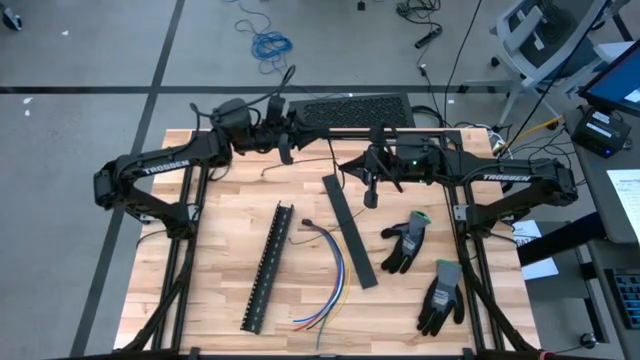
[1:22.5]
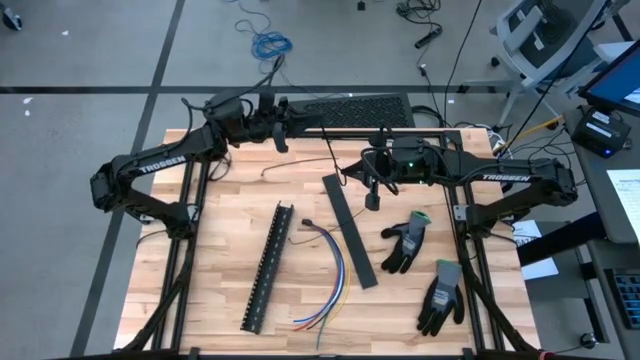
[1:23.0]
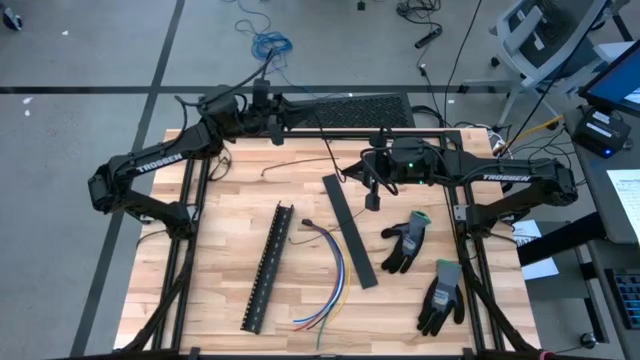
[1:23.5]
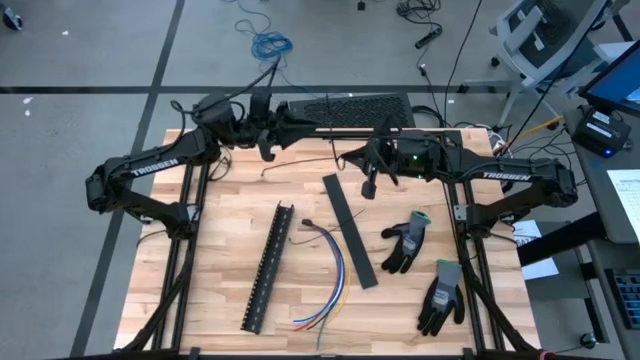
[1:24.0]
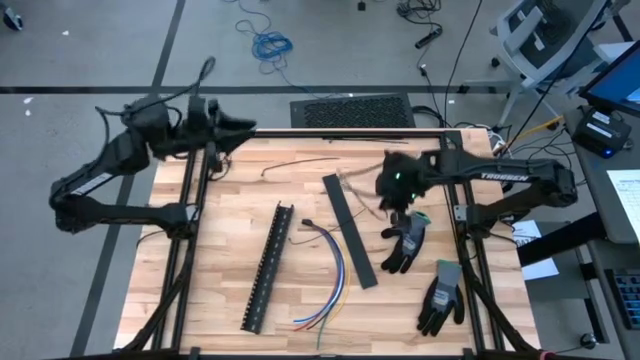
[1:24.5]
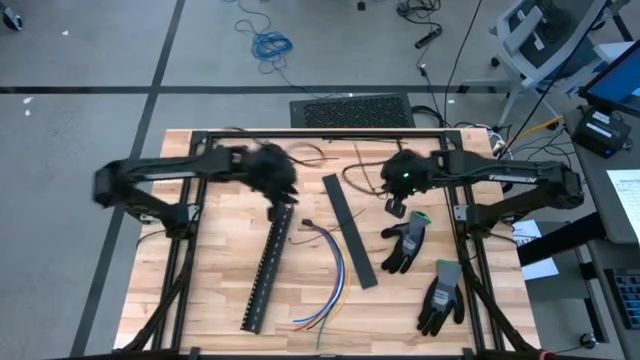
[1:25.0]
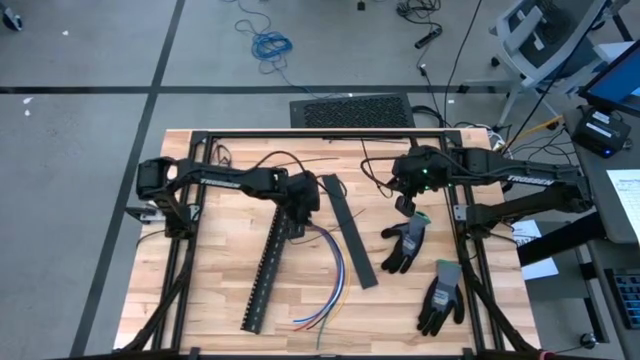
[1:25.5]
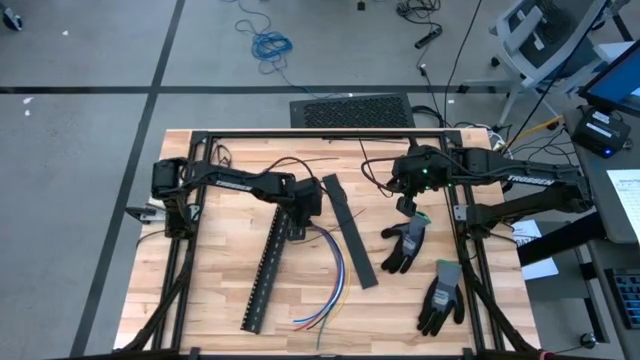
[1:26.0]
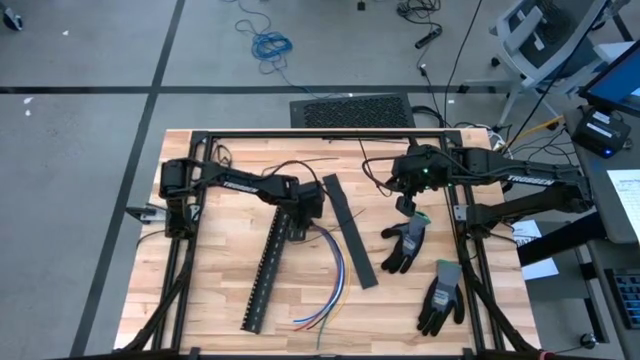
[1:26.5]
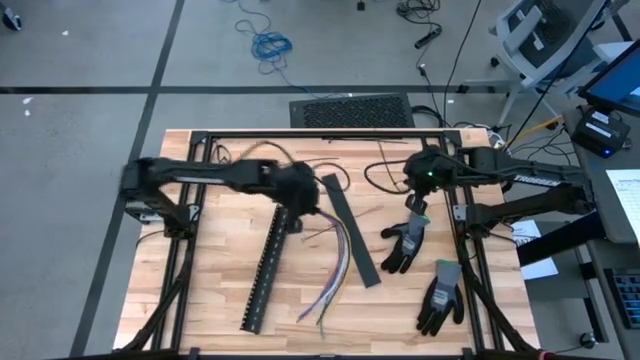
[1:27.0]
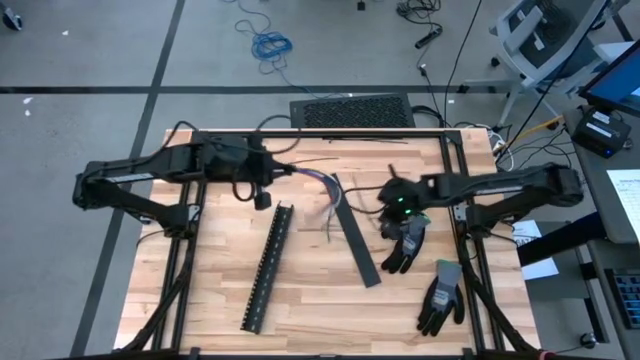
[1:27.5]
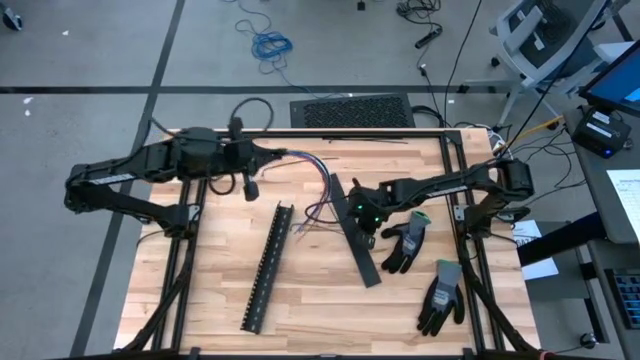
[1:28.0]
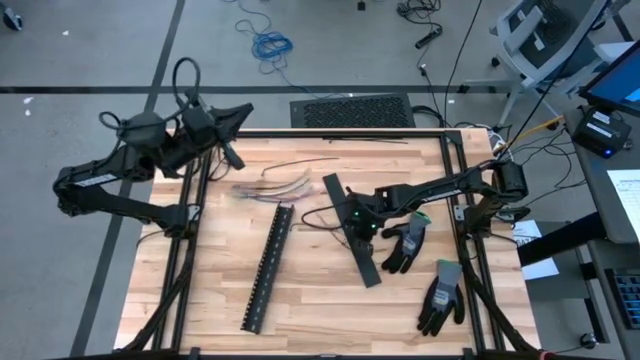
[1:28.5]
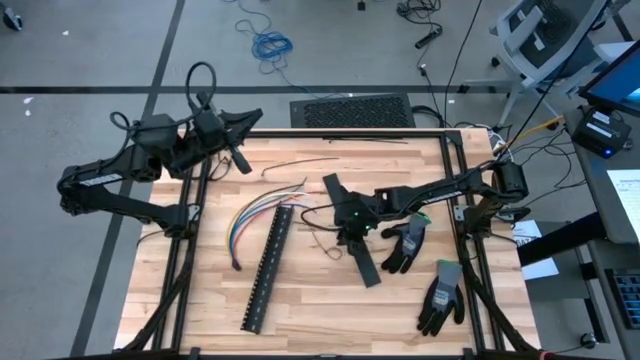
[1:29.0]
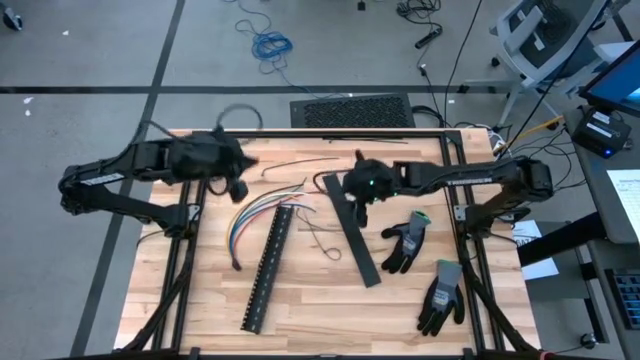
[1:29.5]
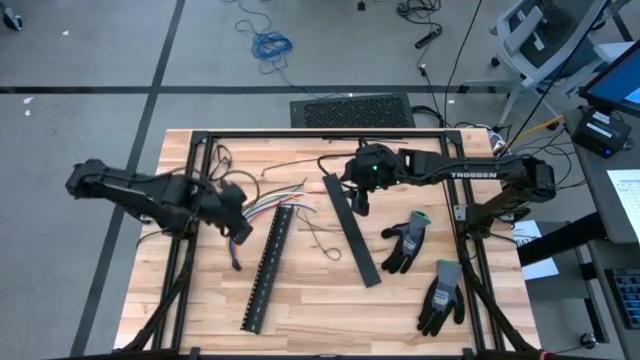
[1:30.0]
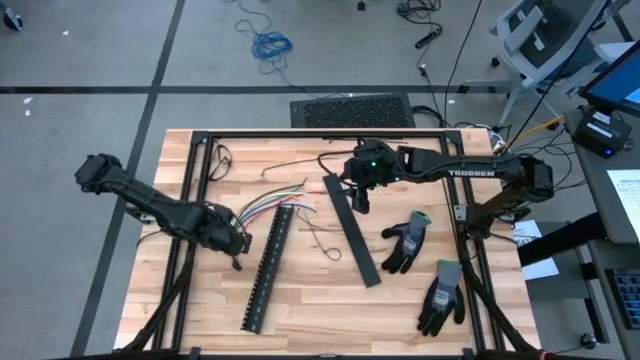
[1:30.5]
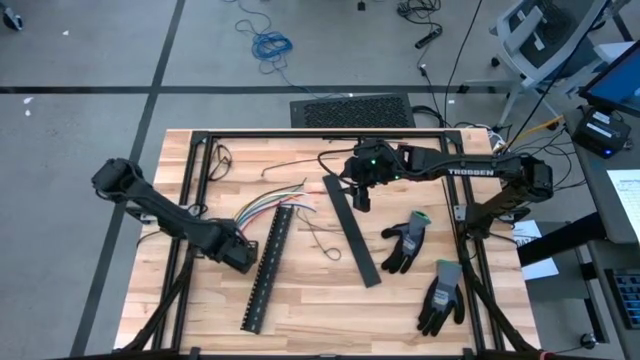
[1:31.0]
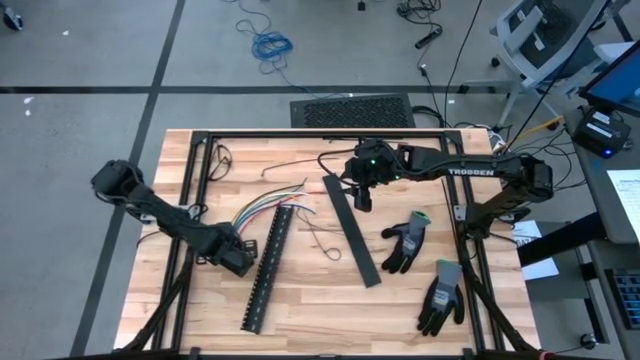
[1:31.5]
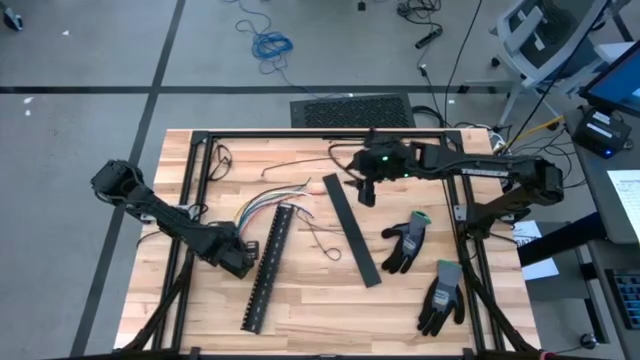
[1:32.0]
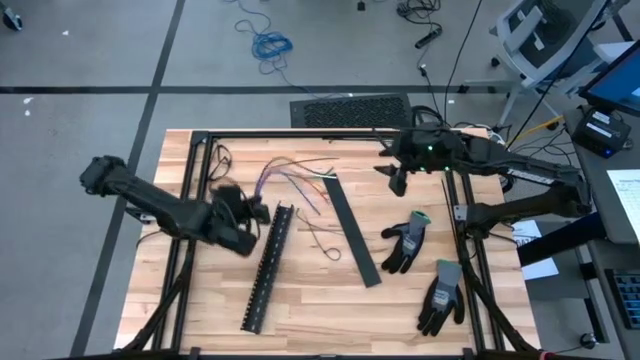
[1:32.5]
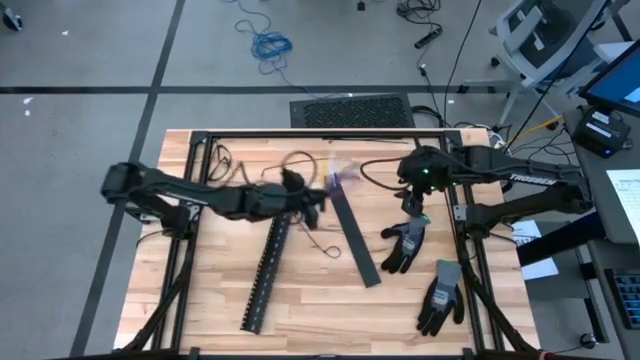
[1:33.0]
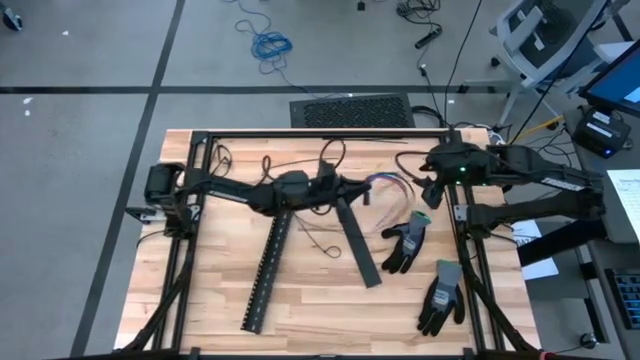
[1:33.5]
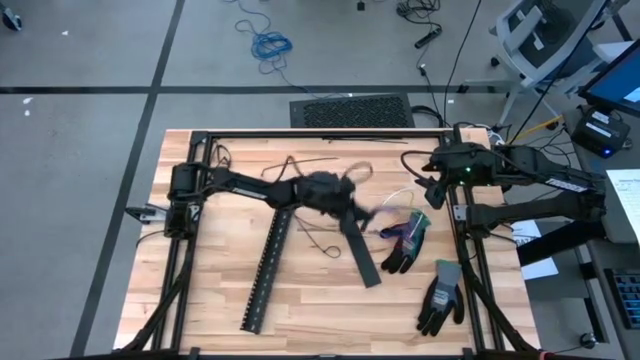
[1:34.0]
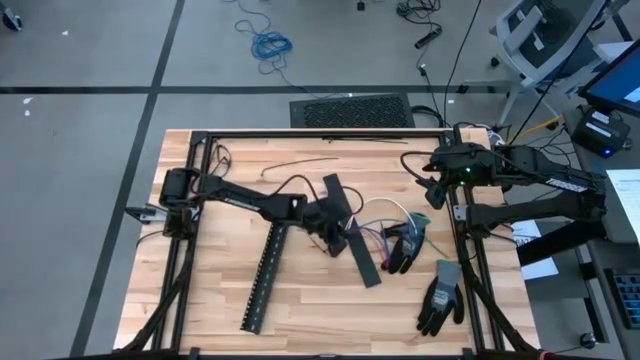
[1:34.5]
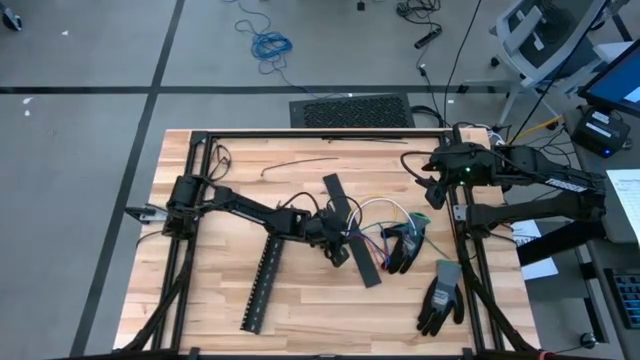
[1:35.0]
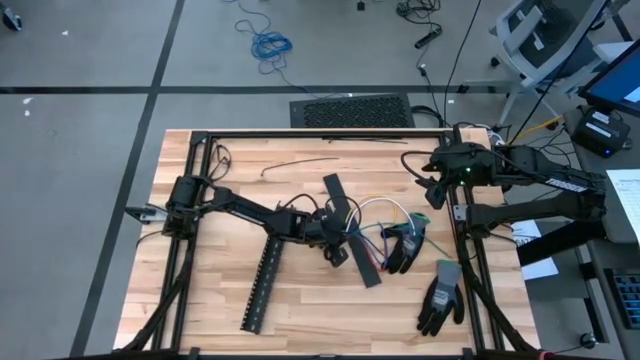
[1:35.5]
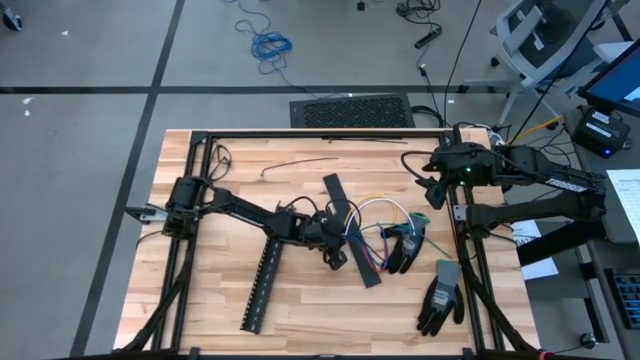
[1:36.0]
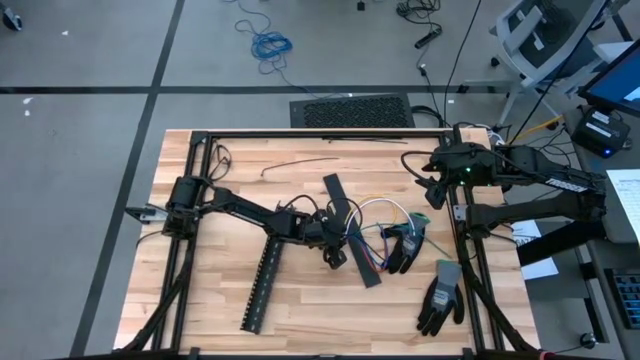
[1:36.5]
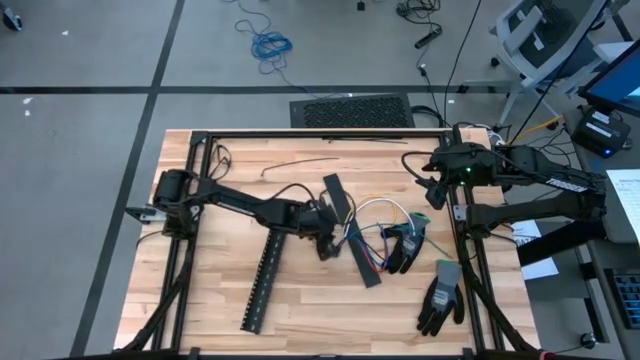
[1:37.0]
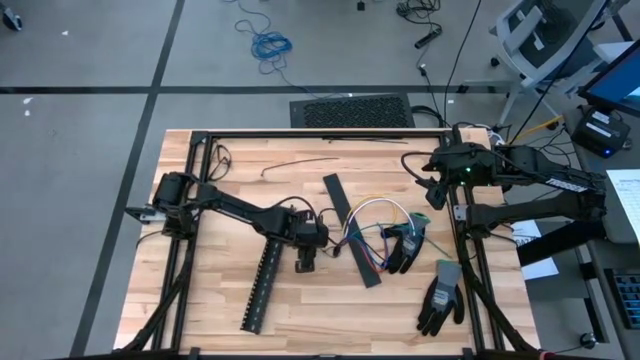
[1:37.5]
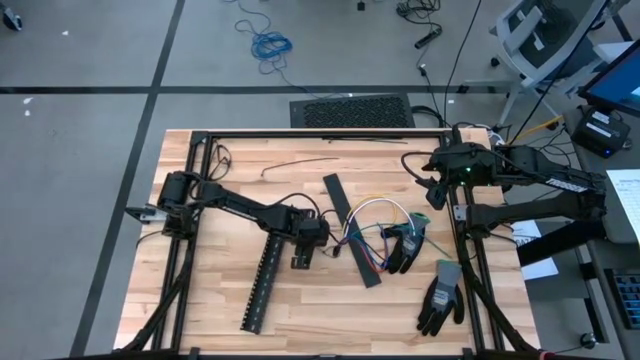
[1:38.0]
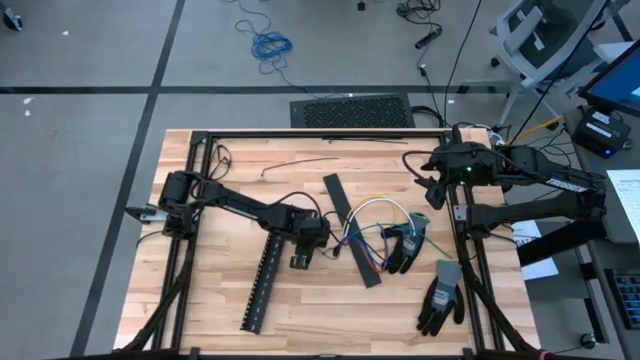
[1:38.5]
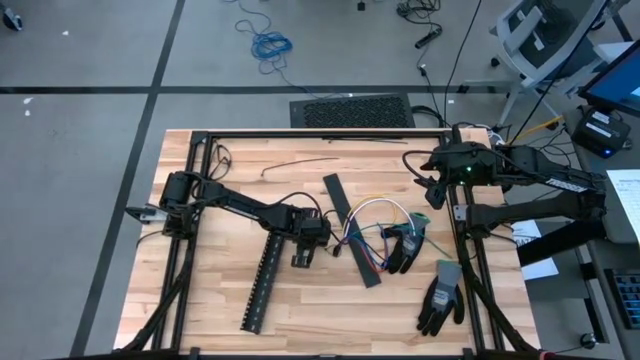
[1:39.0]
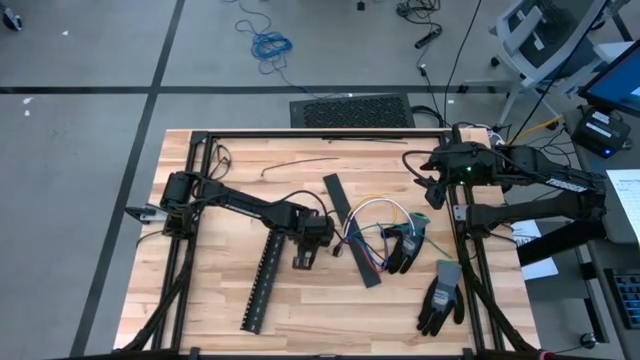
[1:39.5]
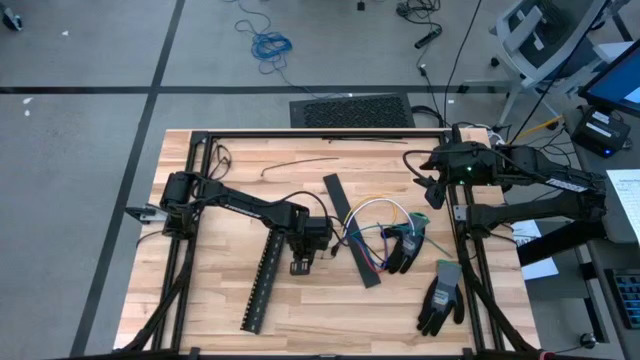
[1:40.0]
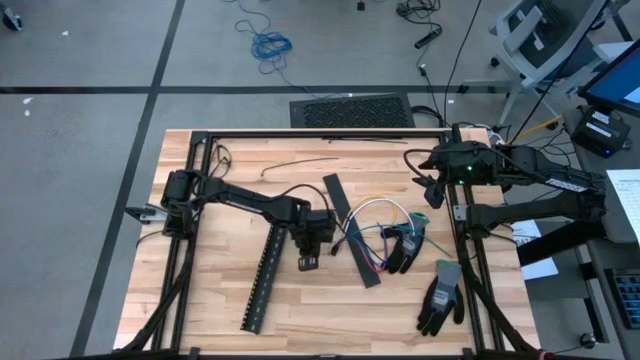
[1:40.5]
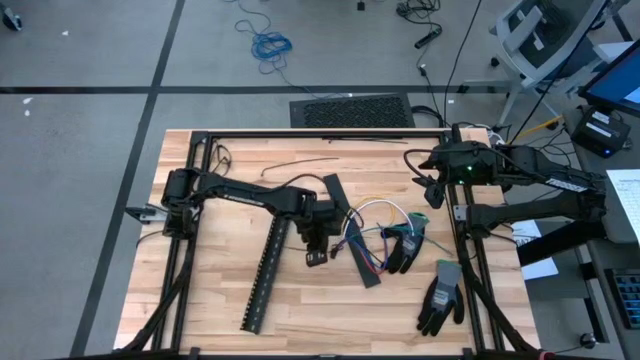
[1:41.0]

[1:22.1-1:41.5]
Task: Ziptie cables
Wrap the black zip tie on the cables

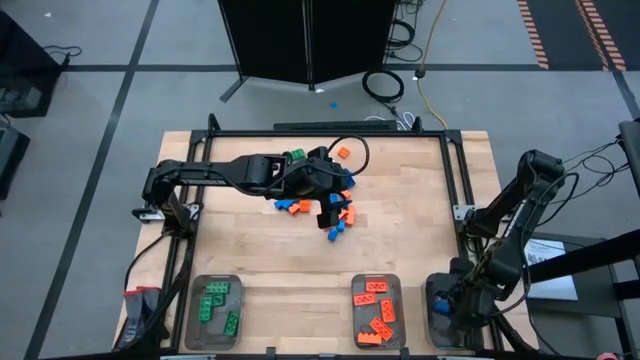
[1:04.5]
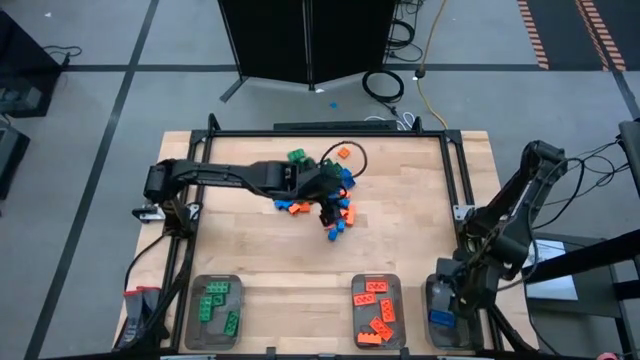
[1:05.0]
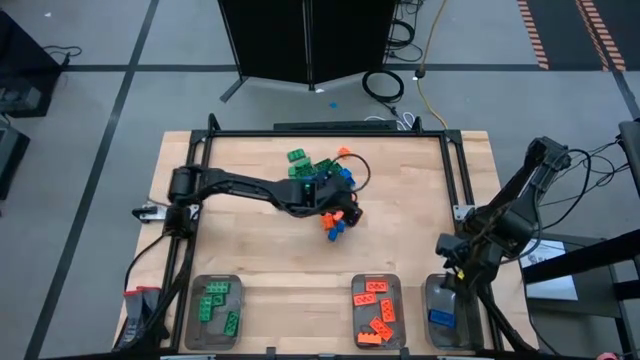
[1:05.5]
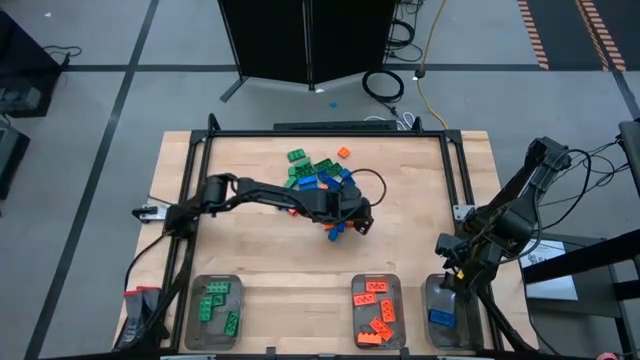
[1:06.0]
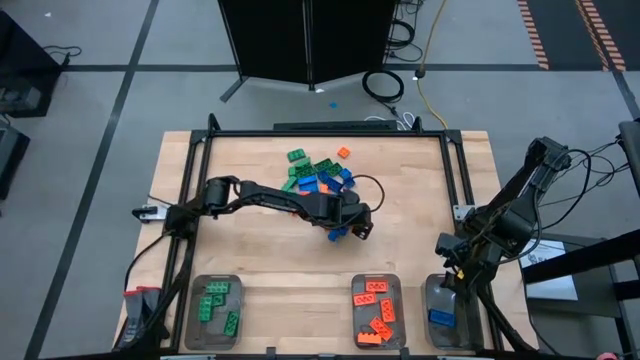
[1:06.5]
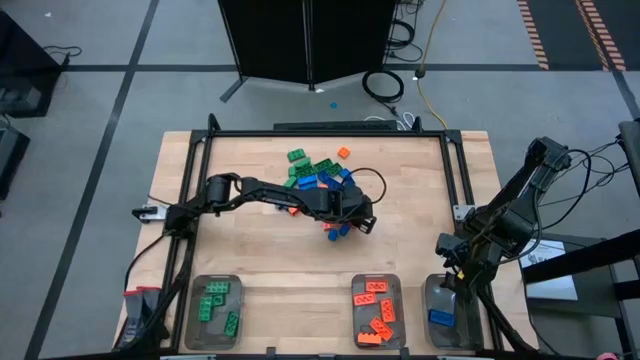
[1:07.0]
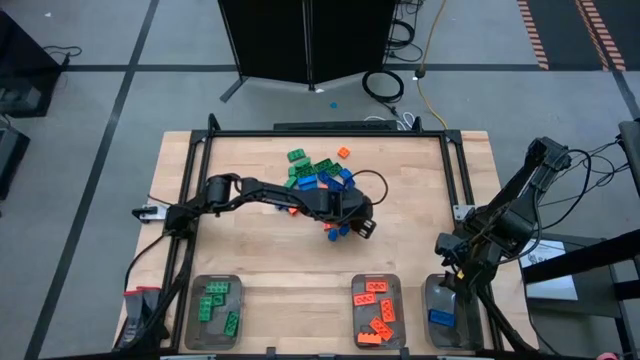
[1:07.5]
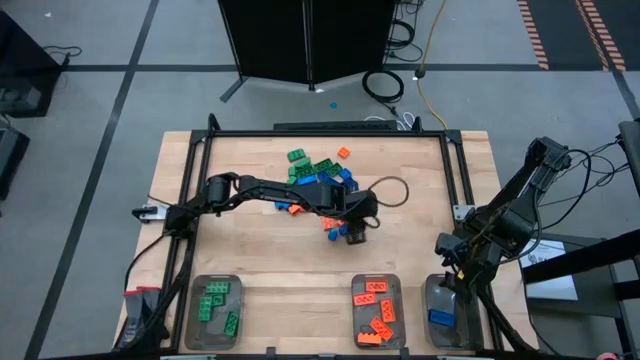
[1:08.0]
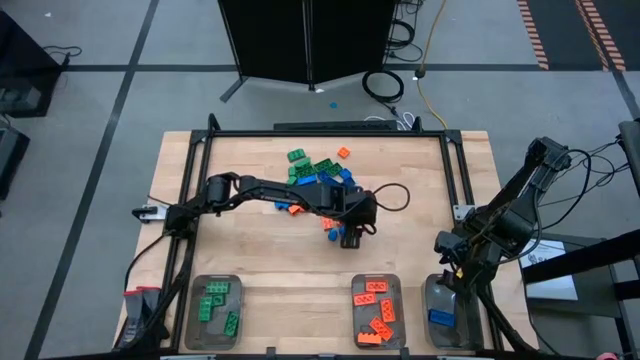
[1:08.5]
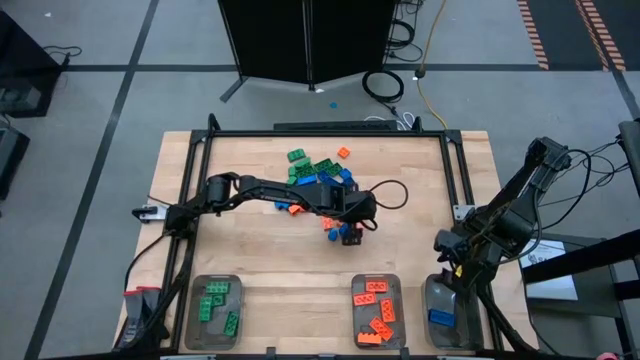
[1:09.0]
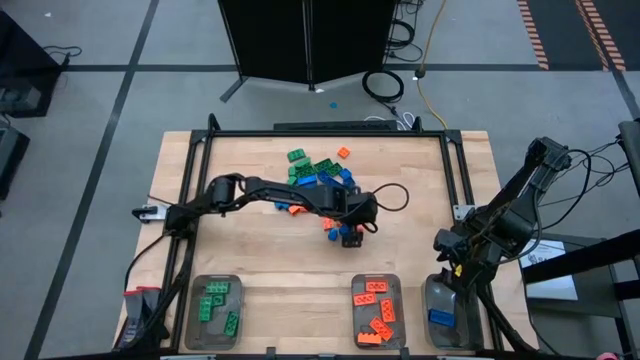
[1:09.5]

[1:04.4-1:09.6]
Task: Sort blocks
Put the orange game piece into the center black bin
